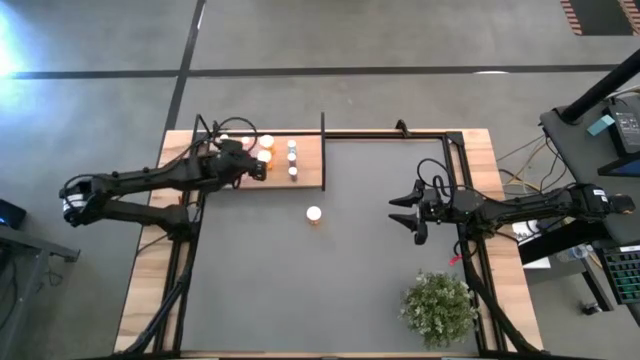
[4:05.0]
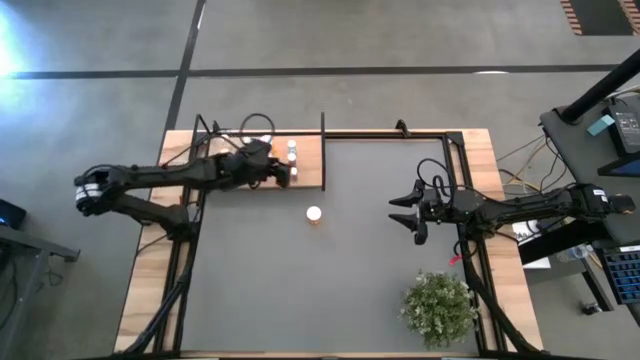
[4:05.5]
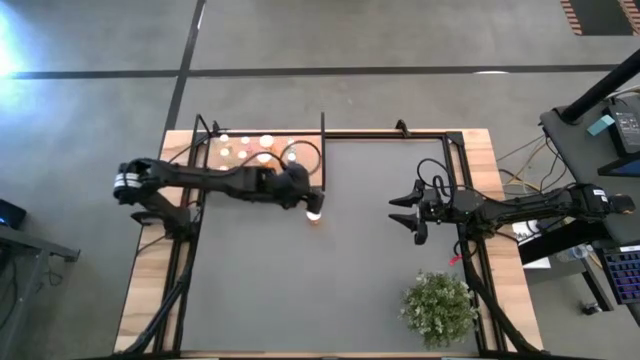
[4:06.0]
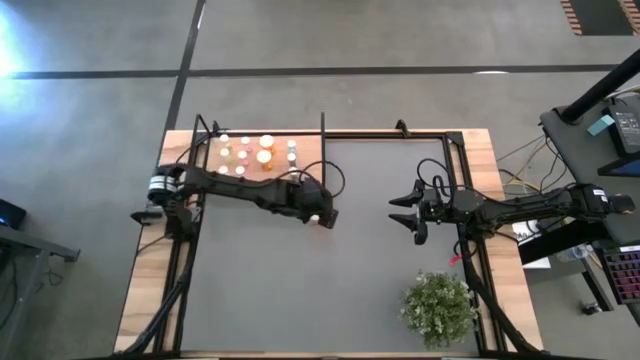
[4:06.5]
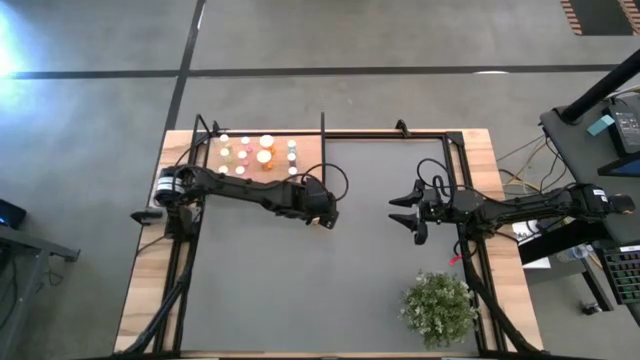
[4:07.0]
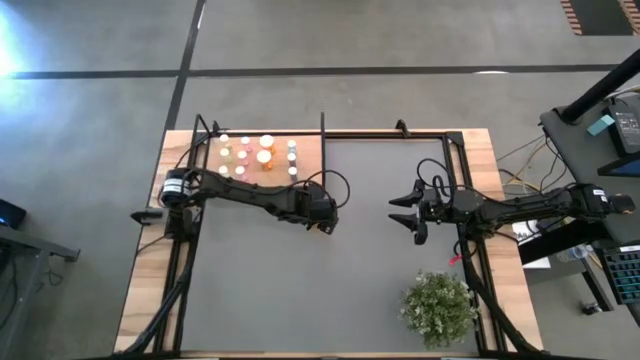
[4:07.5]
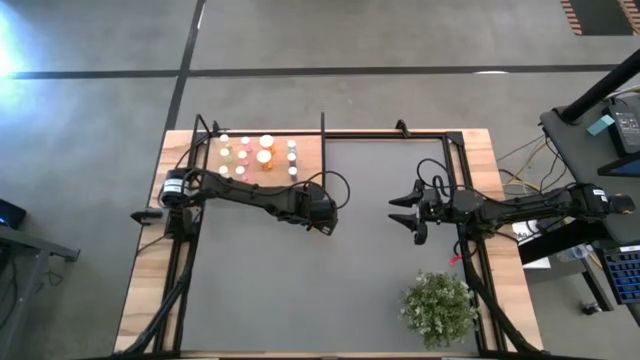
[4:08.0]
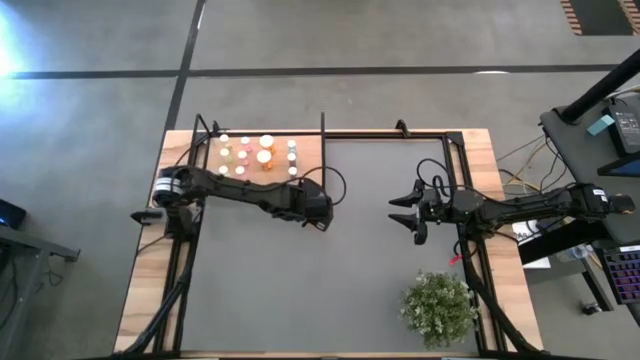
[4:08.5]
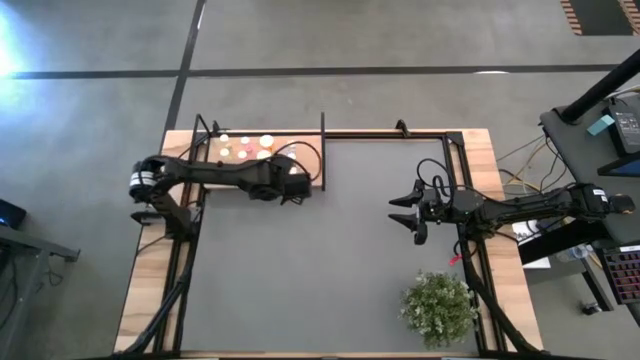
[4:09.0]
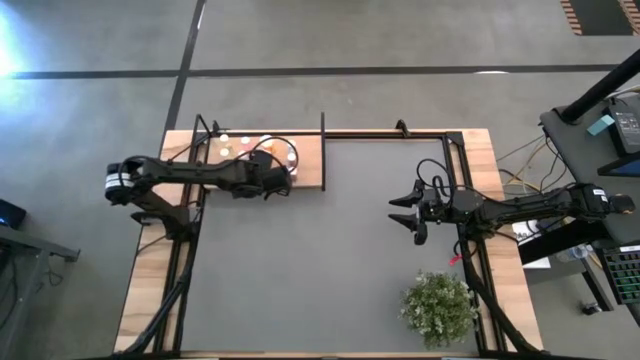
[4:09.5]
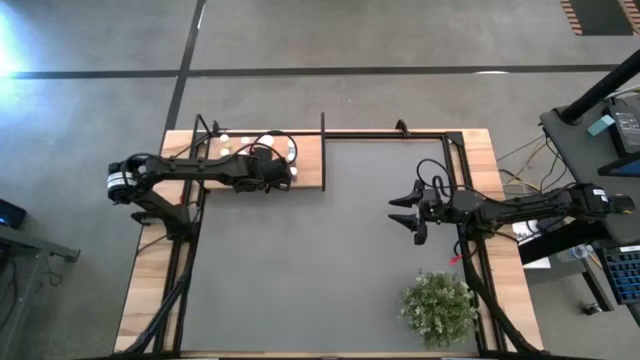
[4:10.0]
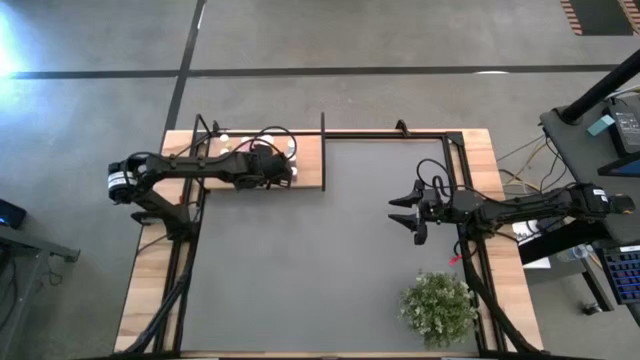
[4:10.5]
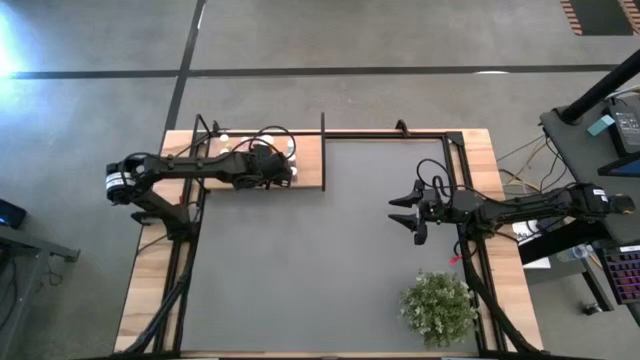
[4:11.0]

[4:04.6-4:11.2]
Task: Pick and place medicine bottles onto shelf by color
Put the orange pill bottle on the shelf aligned with the other orange pill bottles

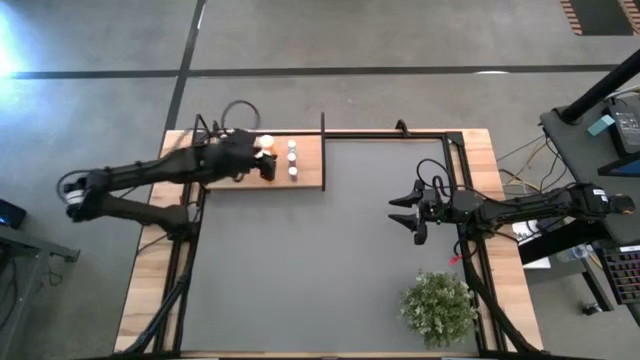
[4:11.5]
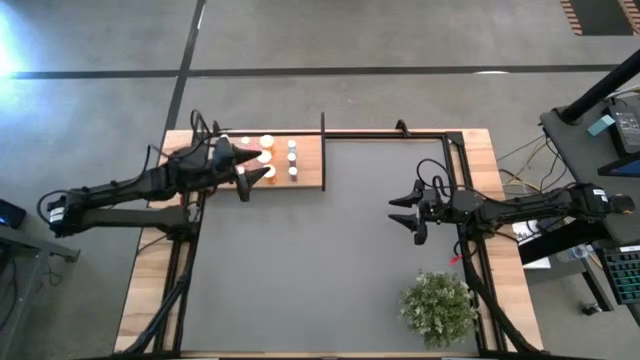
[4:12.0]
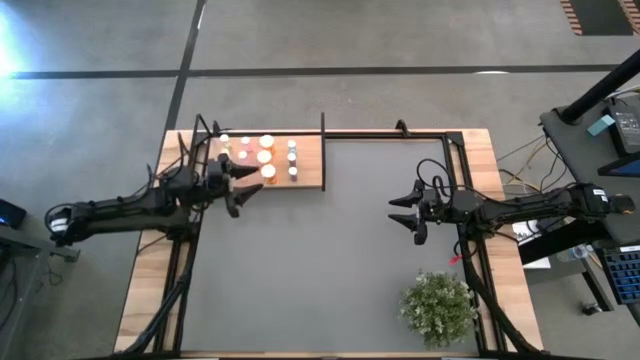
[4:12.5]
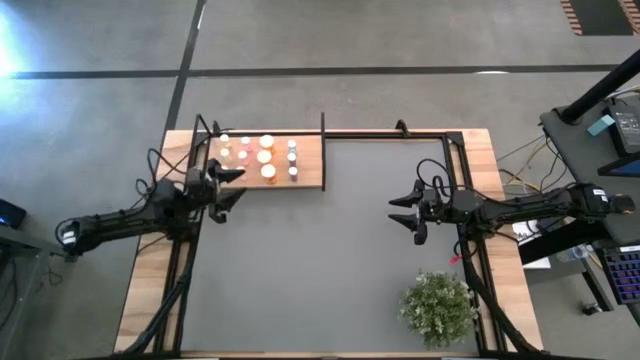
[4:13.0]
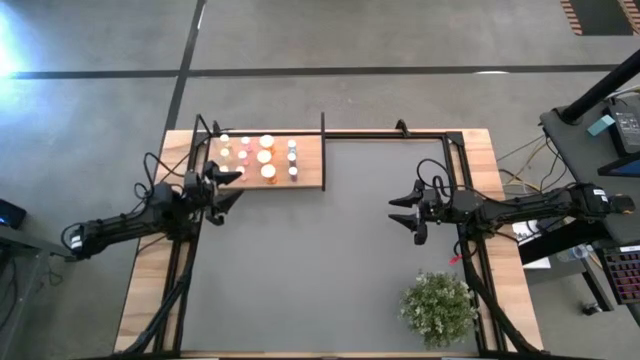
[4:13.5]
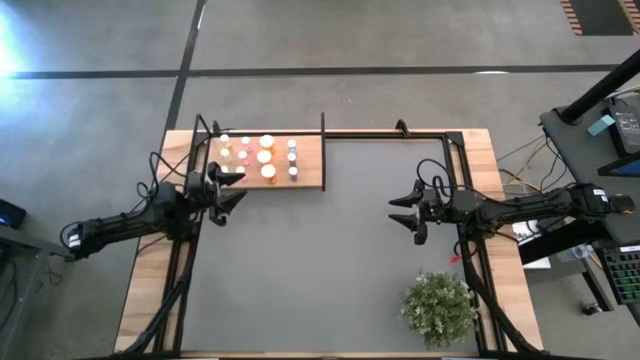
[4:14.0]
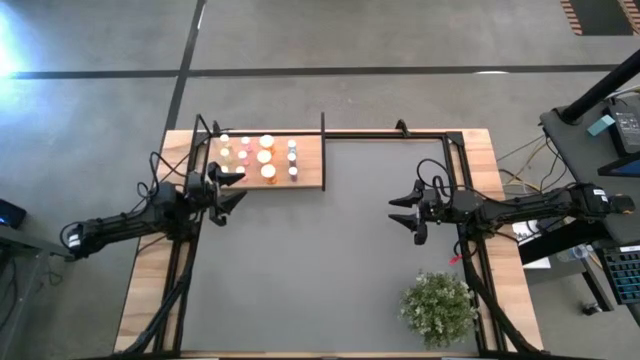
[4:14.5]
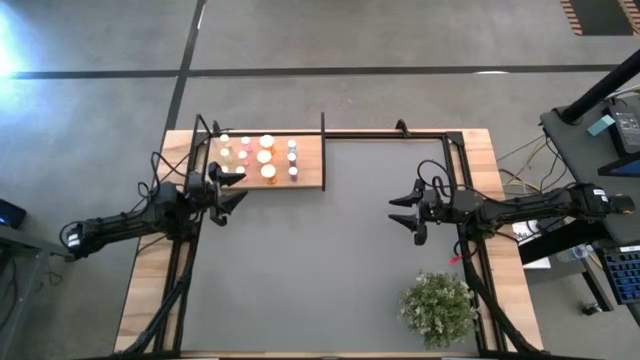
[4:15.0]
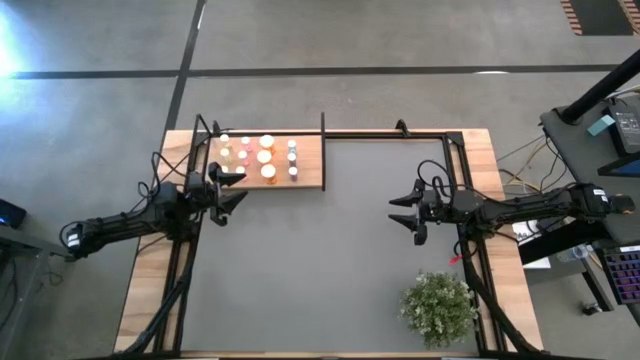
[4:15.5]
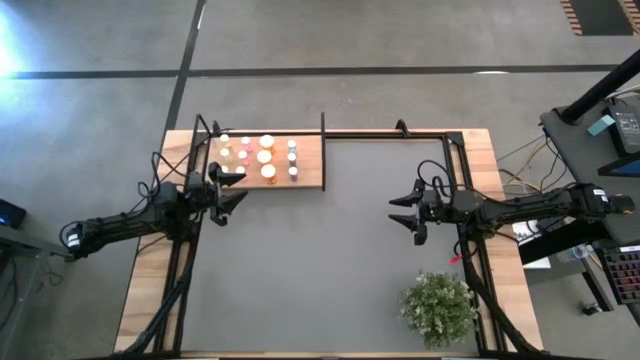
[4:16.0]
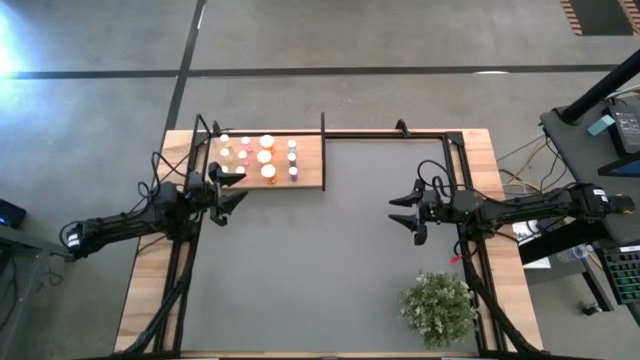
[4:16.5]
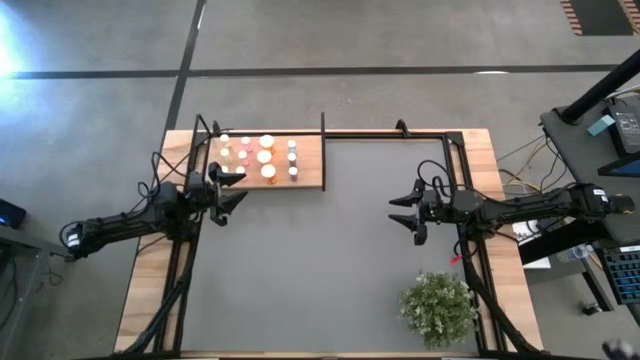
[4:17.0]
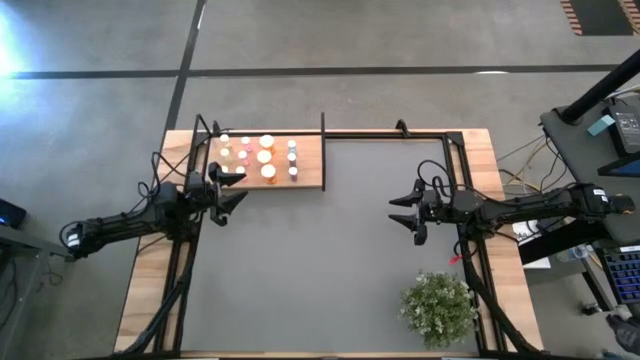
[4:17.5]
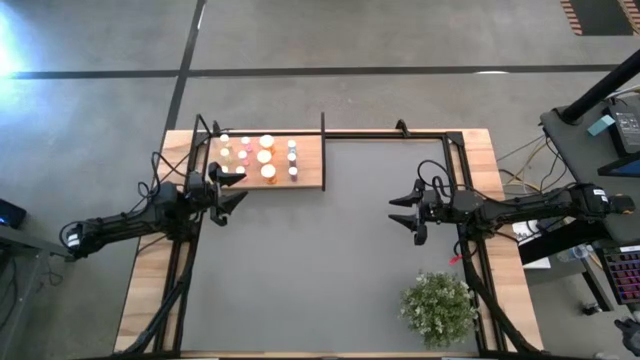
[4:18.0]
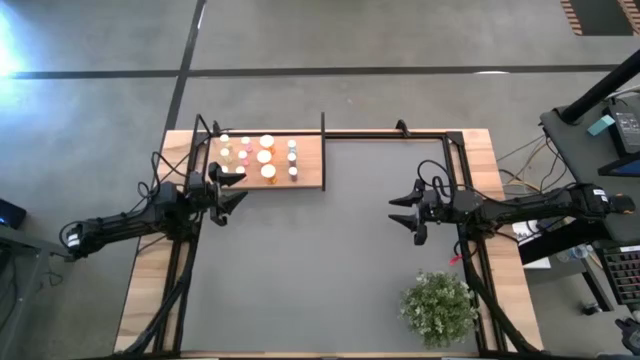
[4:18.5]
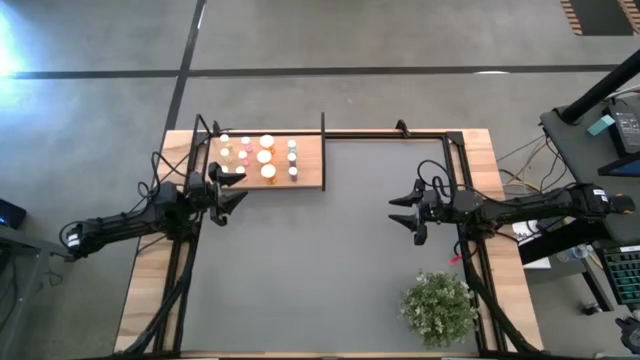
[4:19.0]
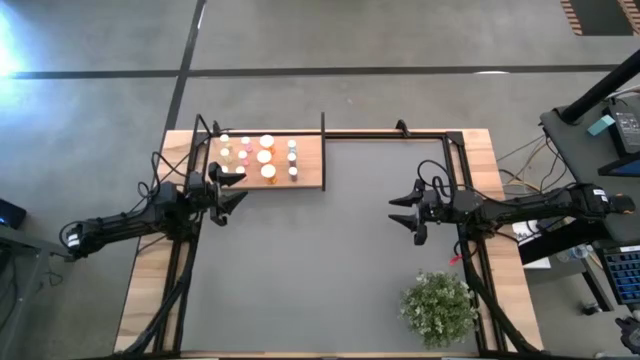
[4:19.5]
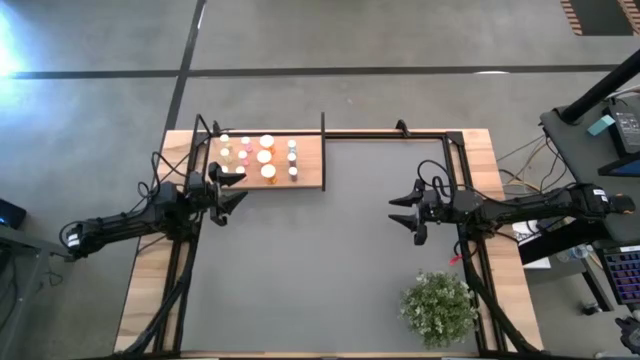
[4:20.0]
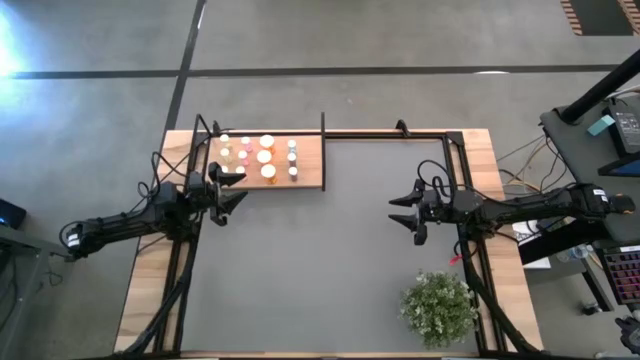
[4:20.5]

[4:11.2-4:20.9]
Return to Home Position

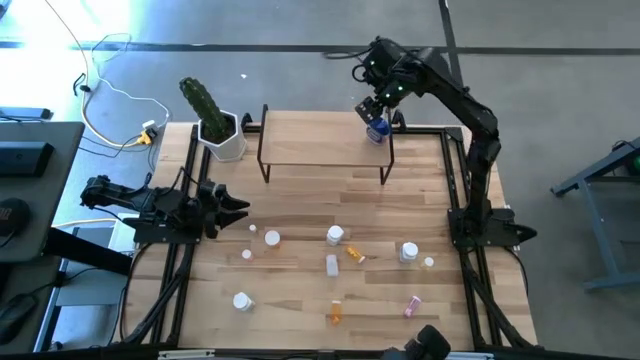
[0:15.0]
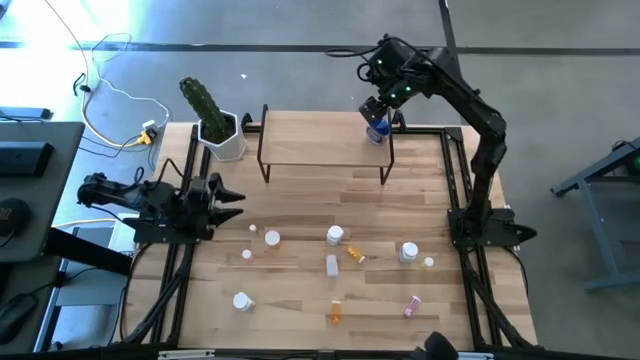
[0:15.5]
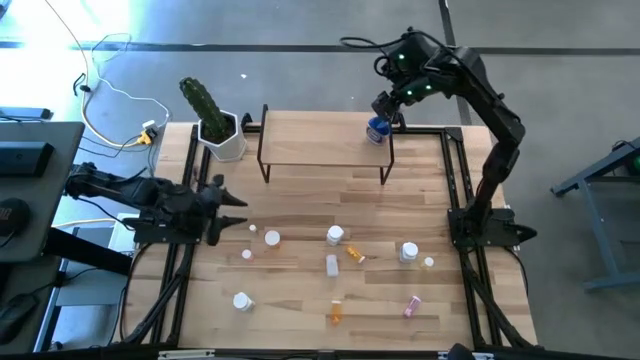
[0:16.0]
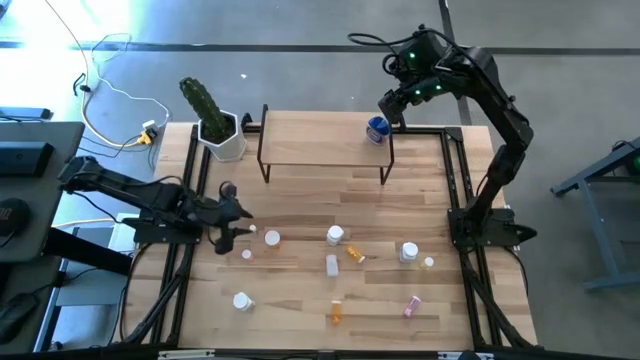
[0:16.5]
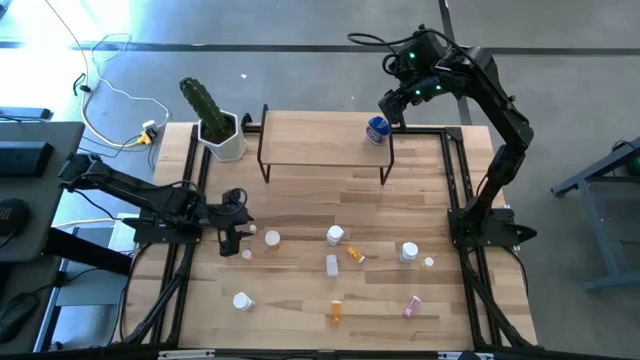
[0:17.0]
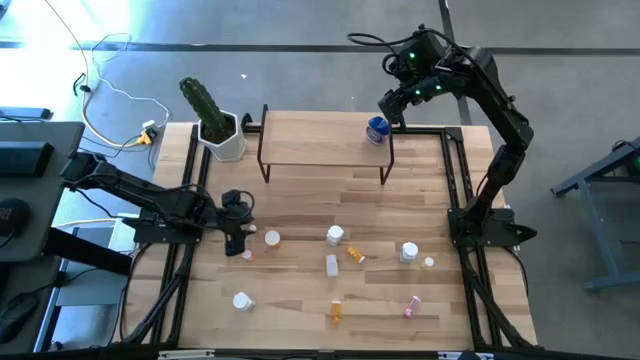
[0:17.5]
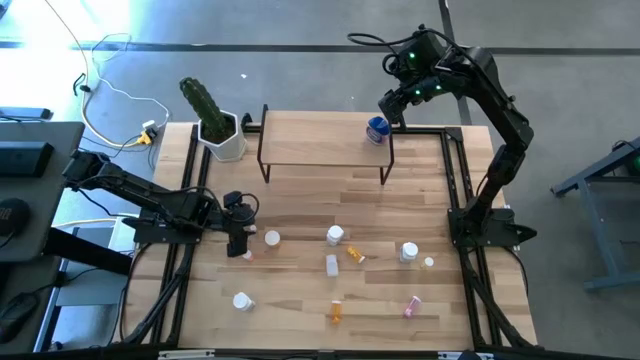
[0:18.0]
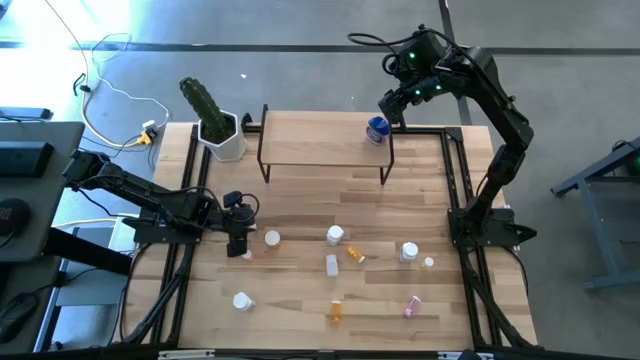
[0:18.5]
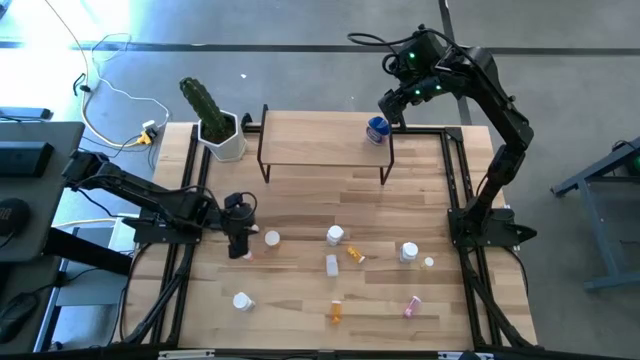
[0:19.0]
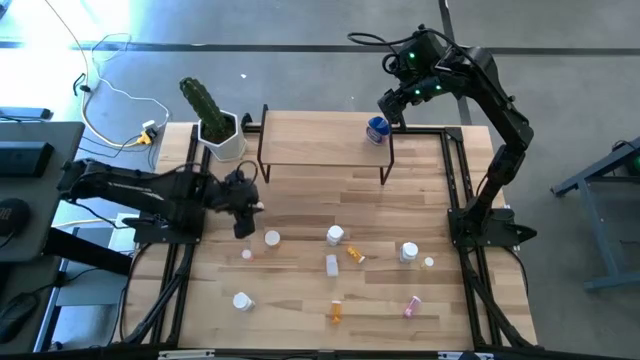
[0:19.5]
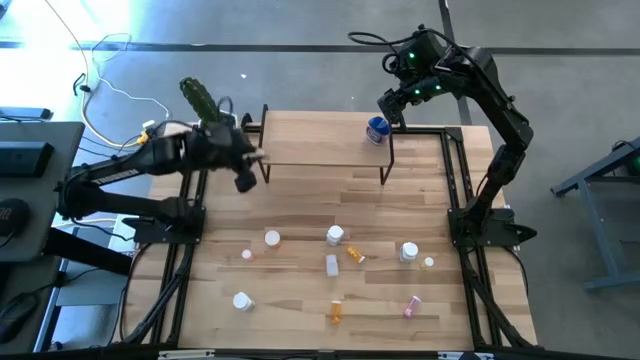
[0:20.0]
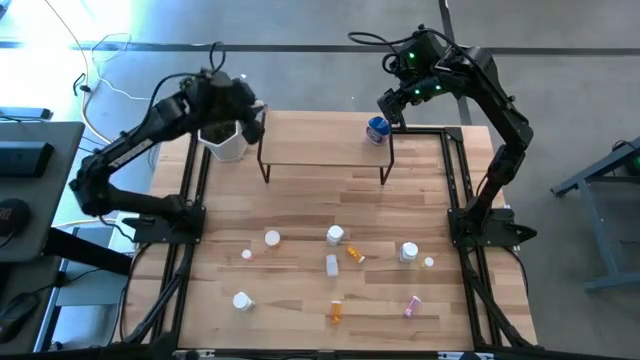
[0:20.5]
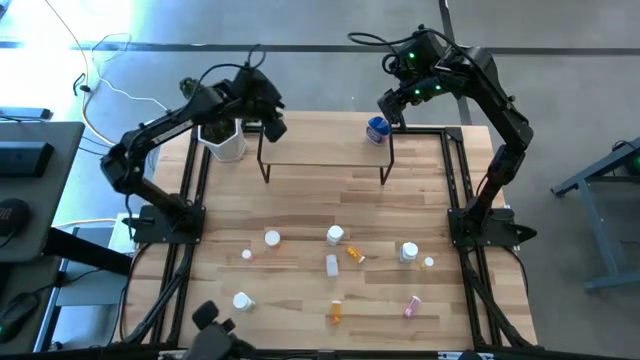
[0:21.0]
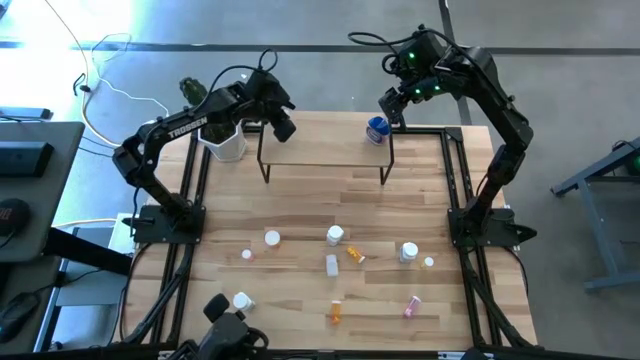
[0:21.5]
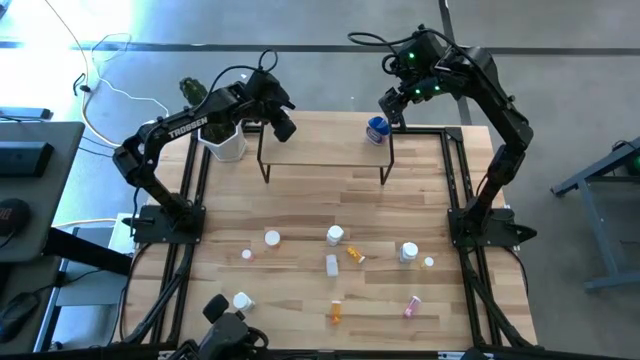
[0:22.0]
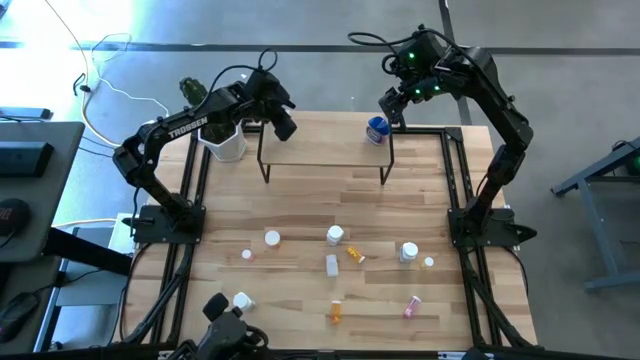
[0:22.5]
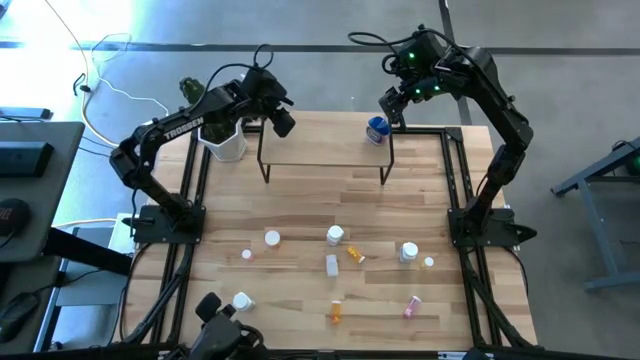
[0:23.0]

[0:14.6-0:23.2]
Task: Pick and place medicine bottles onto shelf by color
Put the light yellow pill bottle on the shelf
